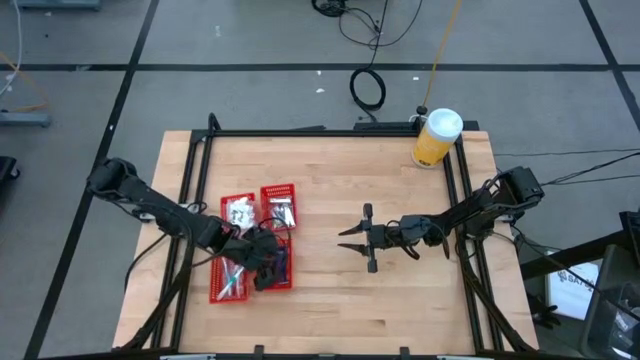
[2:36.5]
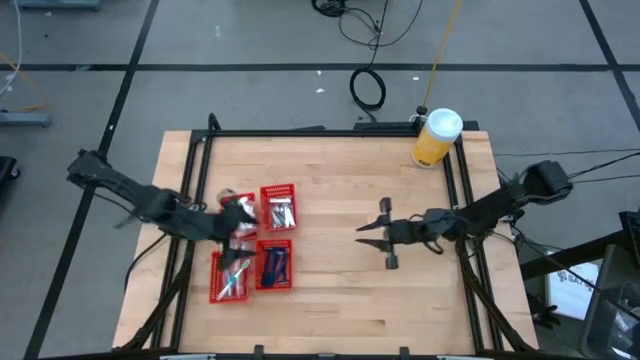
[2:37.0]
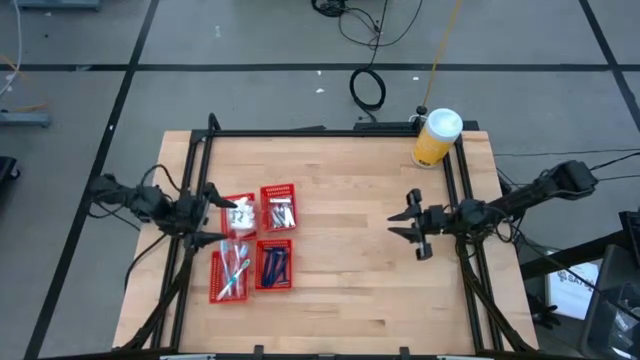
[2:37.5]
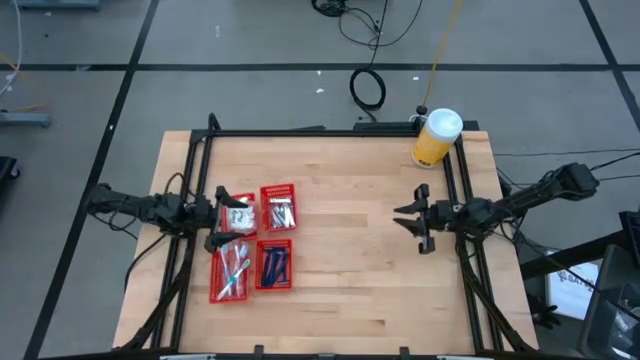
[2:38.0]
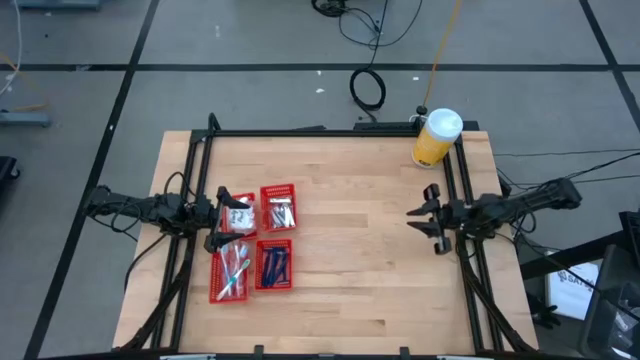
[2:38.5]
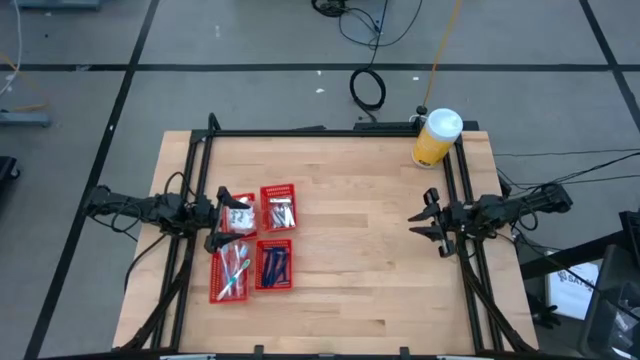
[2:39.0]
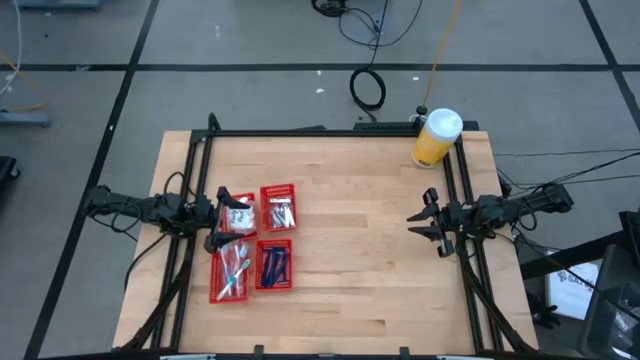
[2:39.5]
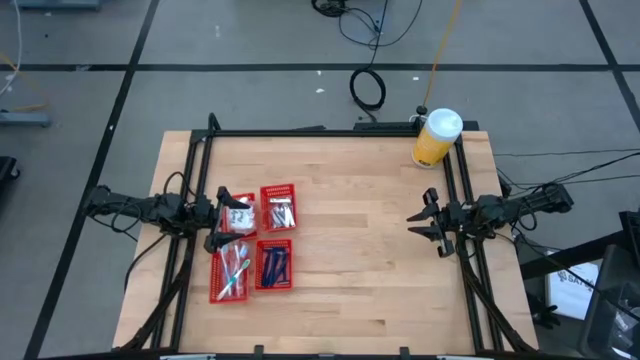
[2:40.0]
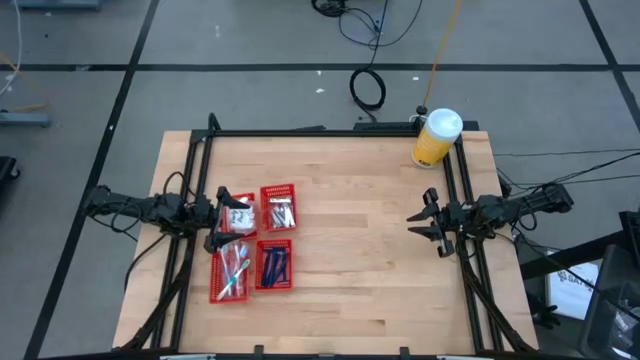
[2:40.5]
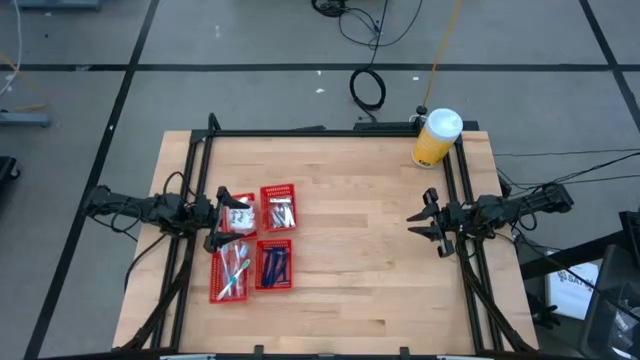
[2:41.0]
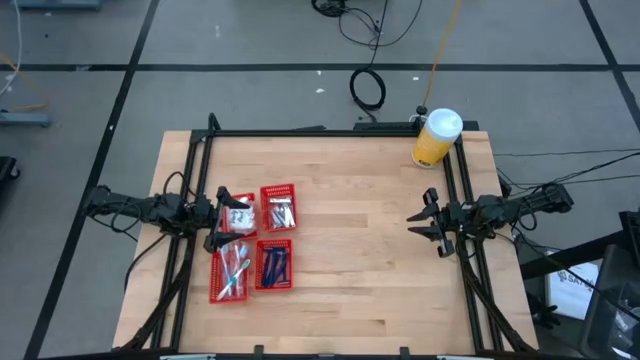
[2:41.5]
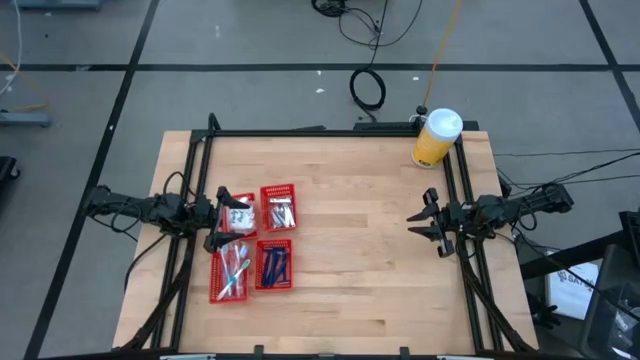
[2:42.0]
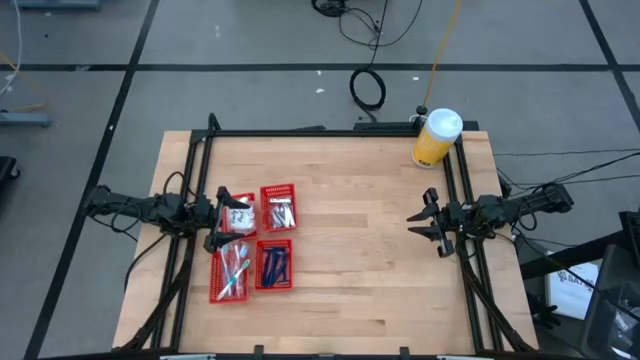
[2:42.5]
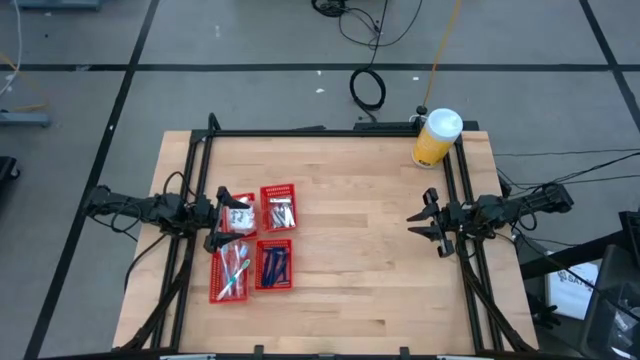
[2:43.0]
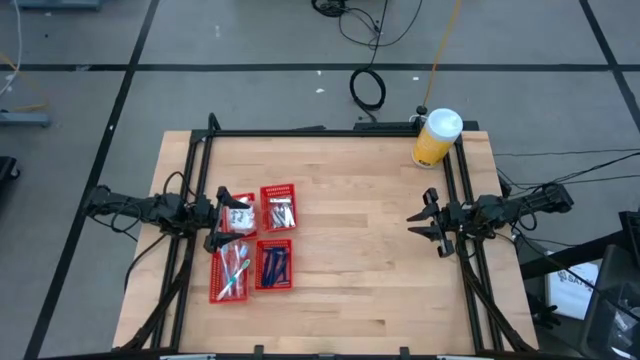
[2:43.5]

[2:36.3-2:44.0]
Task: Pick & Place Travel size toiletries
Return to Home Position

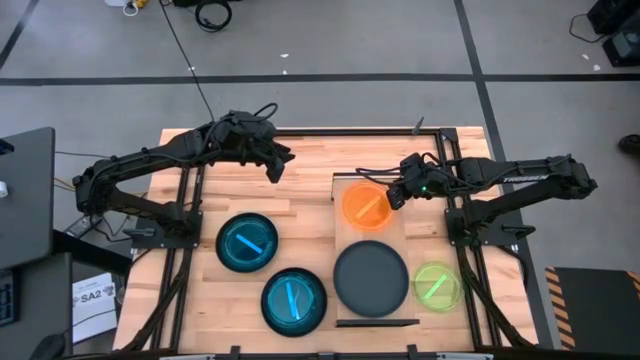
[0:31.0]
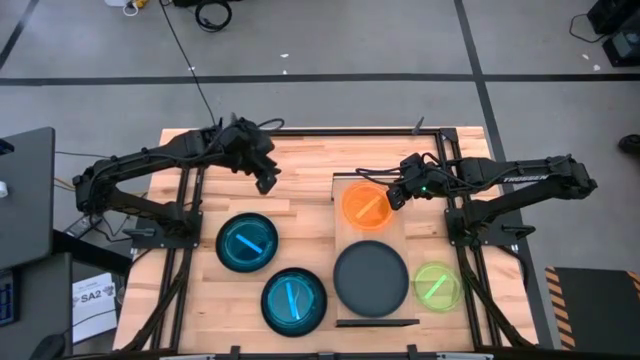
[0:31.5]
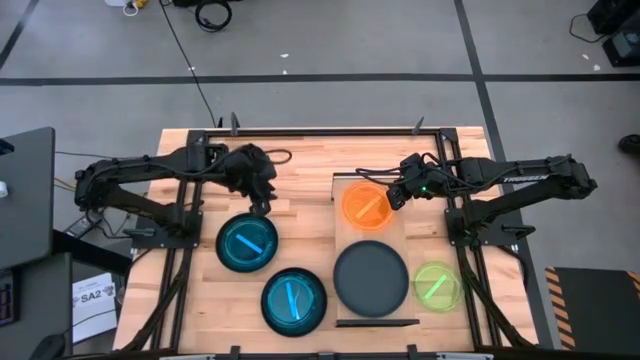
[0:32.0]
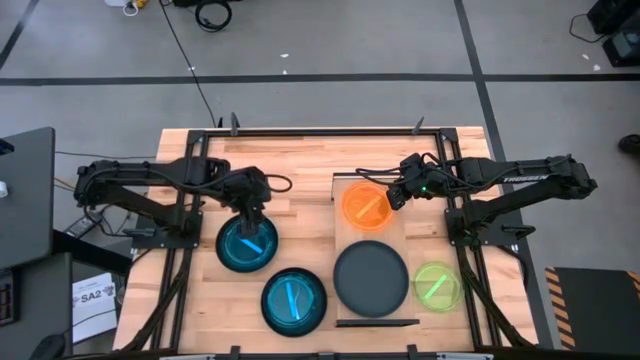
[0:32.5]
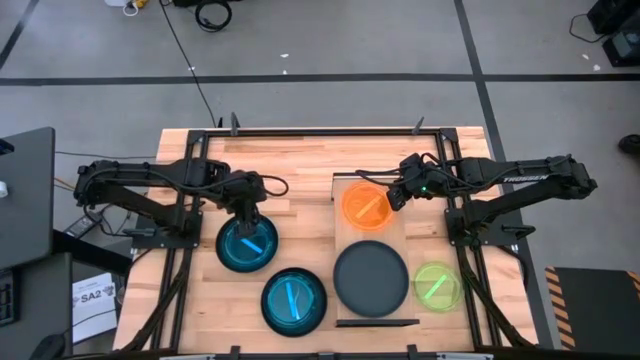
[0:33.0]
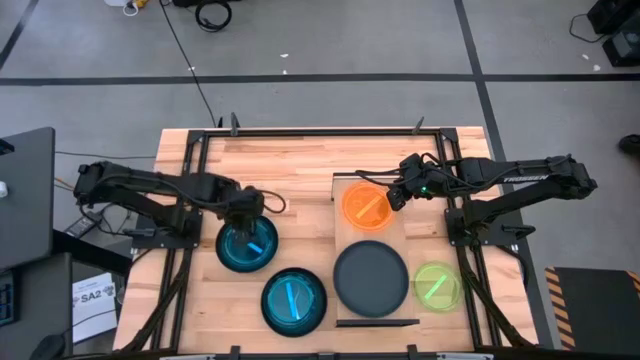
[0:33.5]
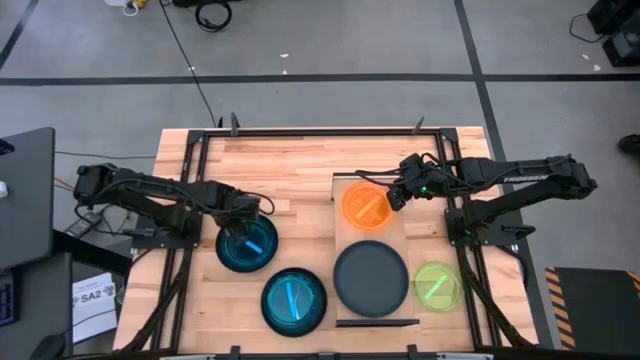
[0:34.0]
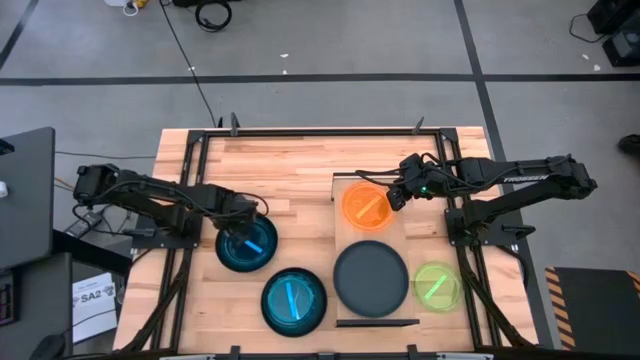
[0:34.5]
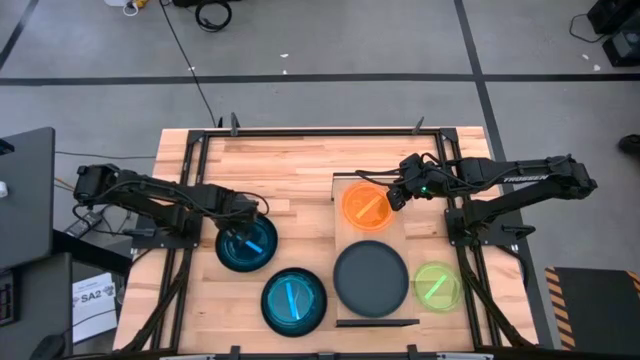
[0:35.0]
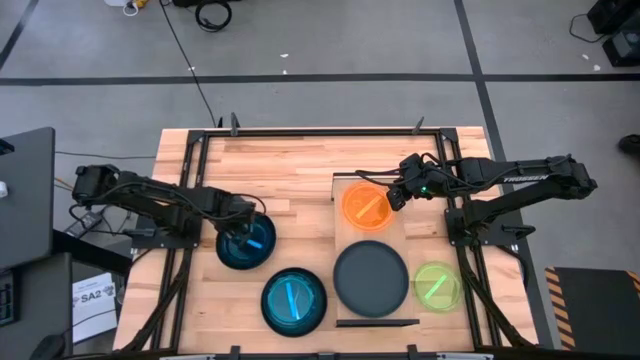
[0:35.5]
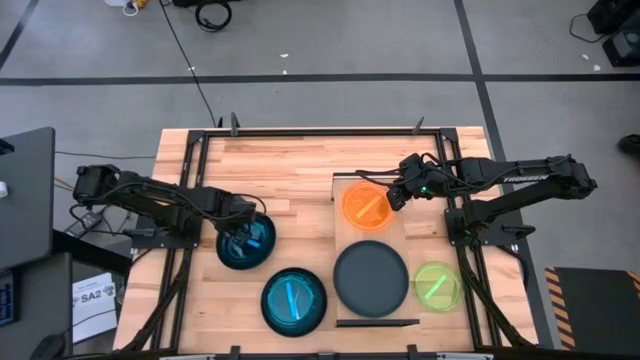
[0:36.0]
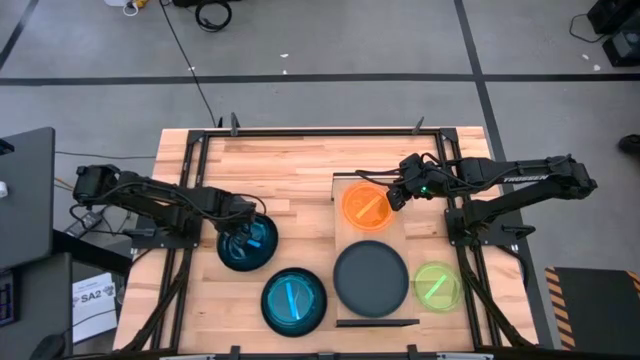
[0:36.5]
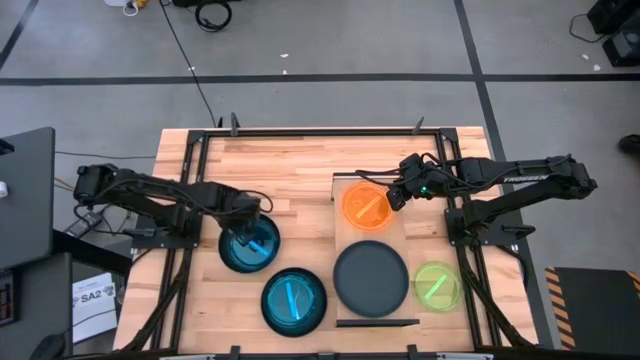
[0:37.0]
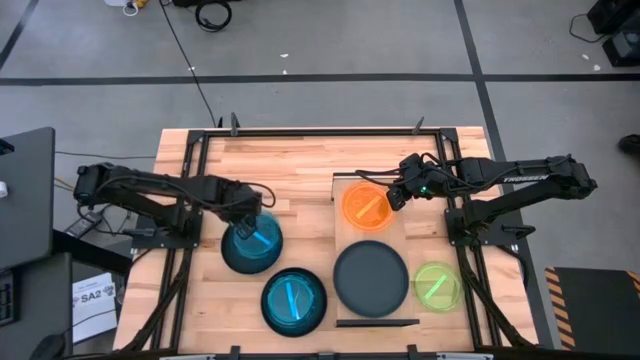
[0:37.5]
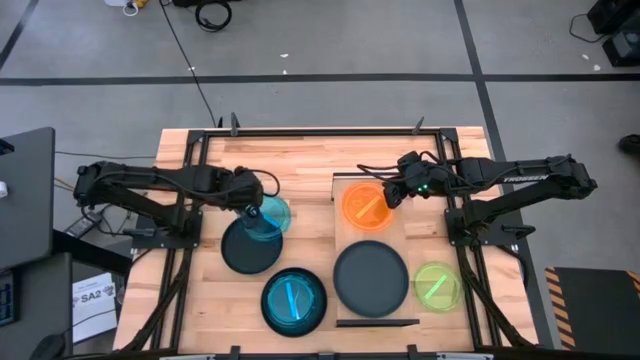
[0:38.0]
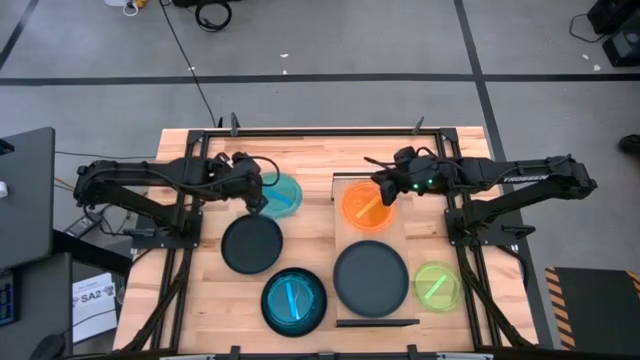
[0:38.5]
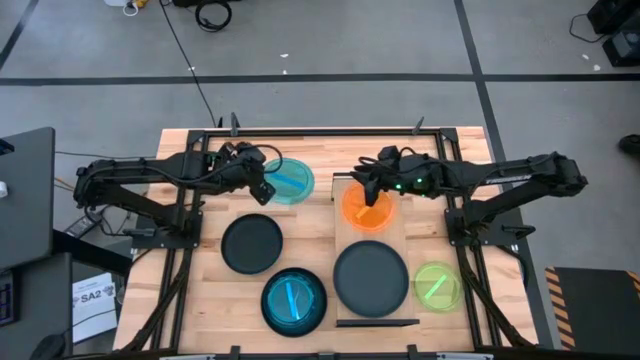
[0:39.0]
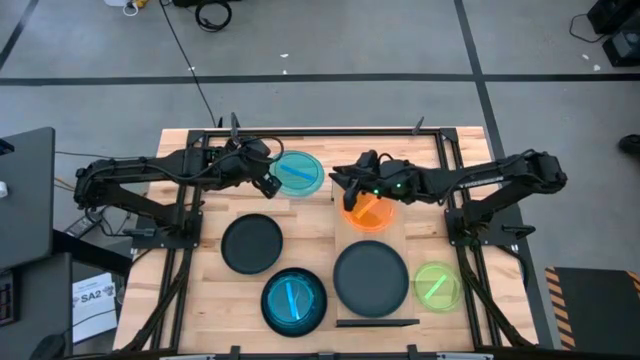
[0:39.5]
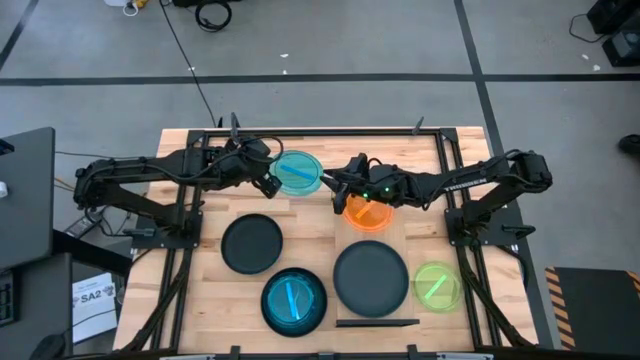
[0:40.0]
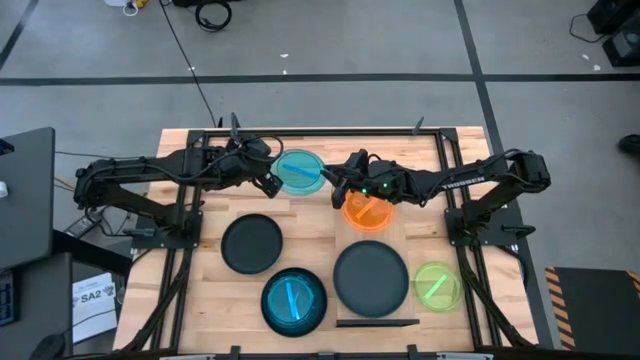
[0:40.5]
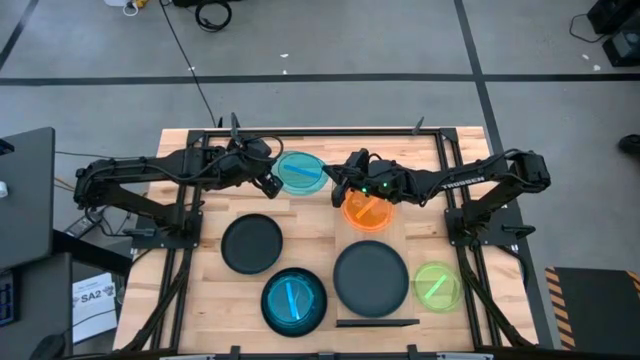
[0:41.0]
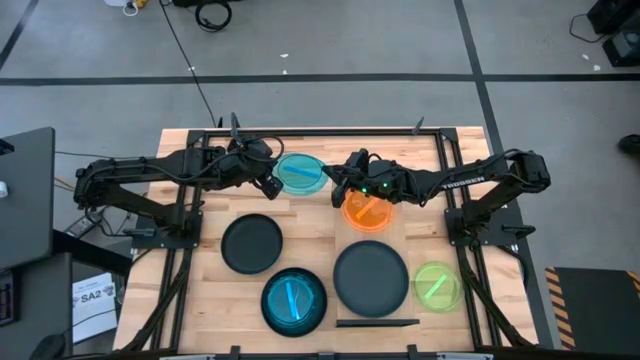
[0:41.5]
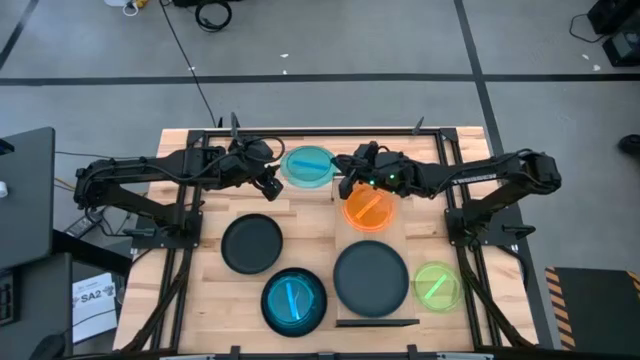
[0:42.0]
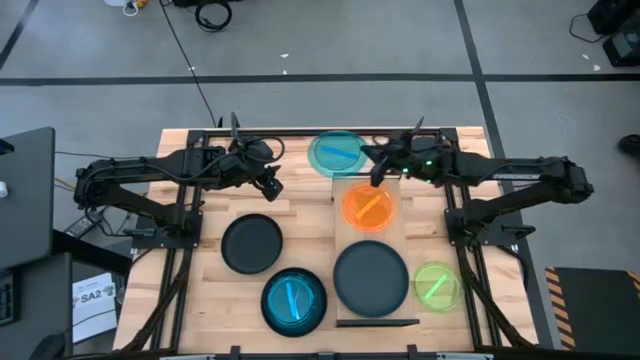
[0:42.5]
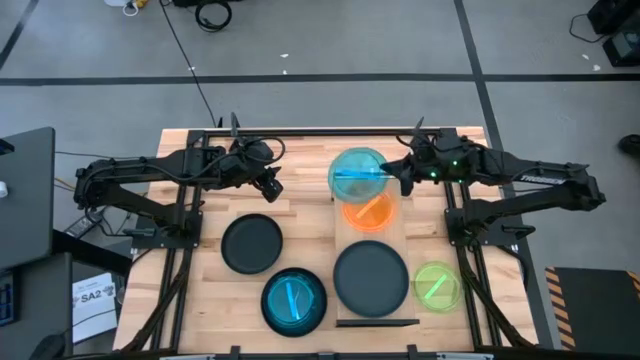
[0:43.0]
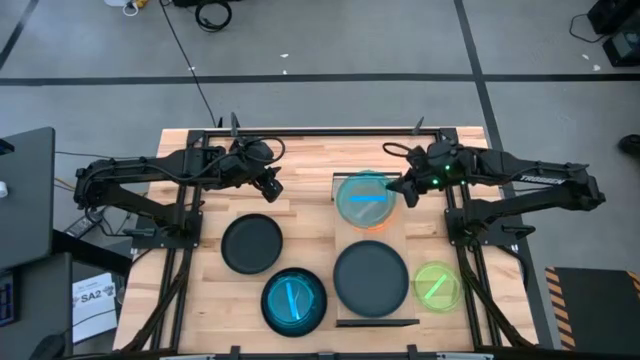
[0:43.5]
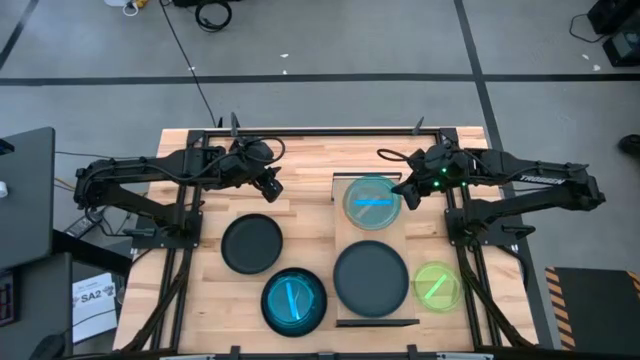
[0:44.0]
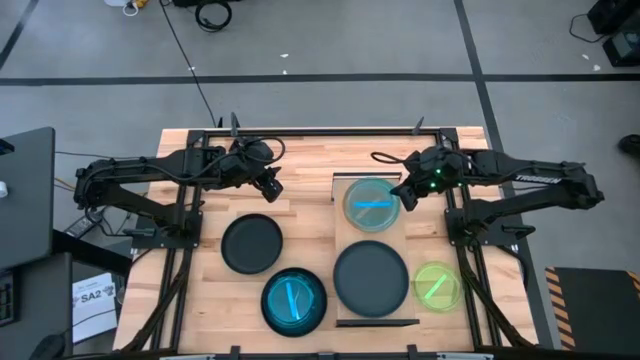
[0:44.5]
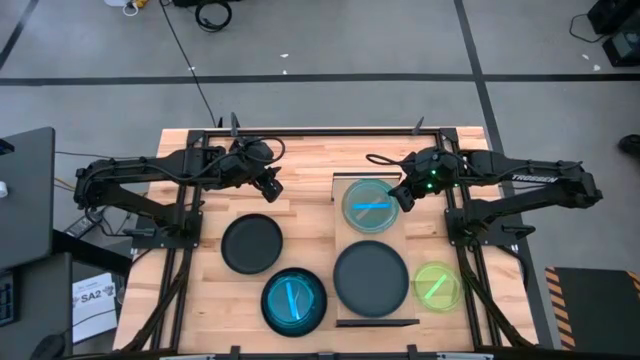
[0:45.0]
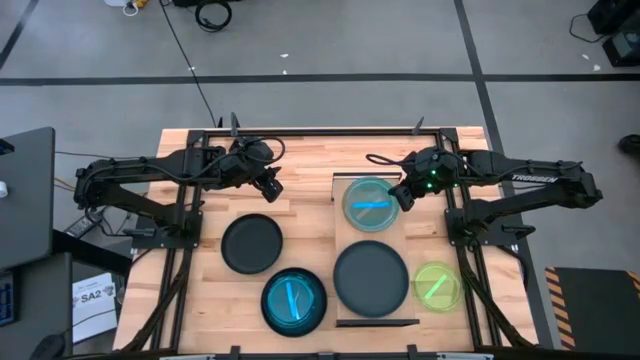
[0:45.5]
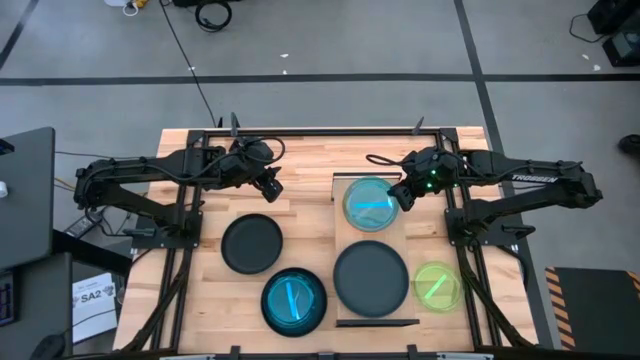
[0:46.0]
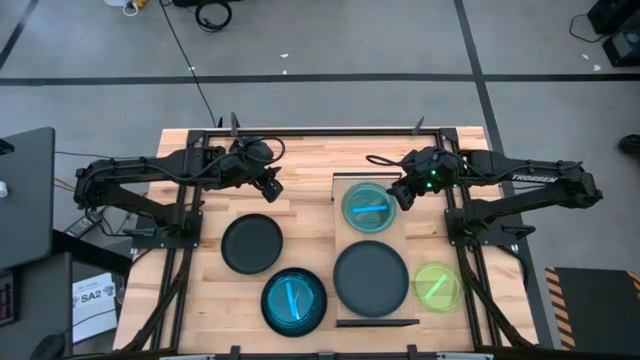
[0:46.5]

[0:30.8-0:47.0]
Task: Place and stack plates onto a shelf
Put the top blue plate on top of the orange plate on the shelf
